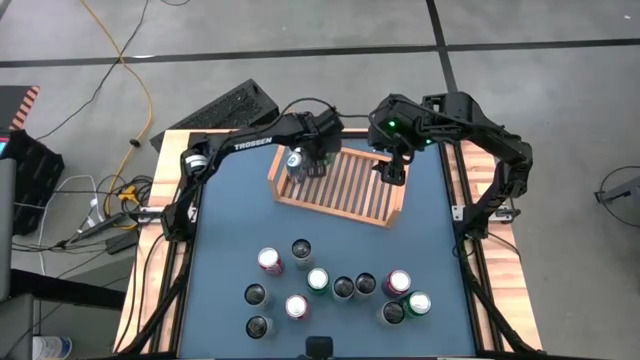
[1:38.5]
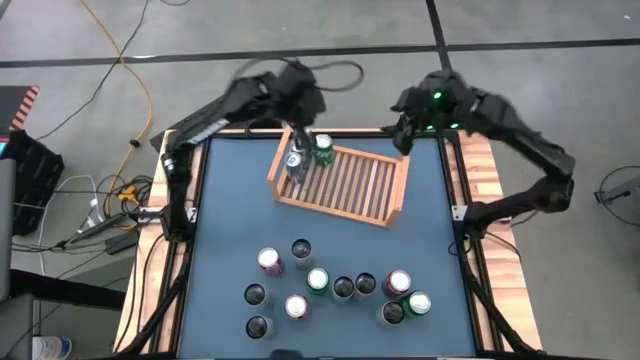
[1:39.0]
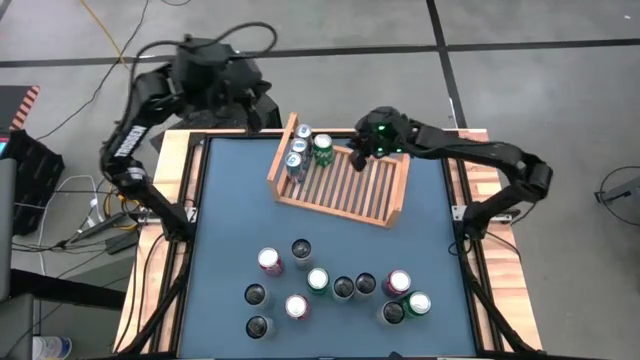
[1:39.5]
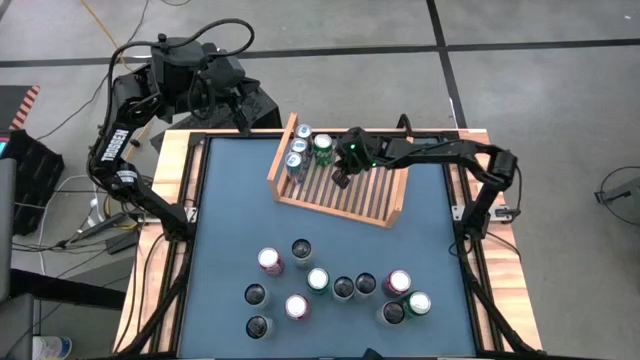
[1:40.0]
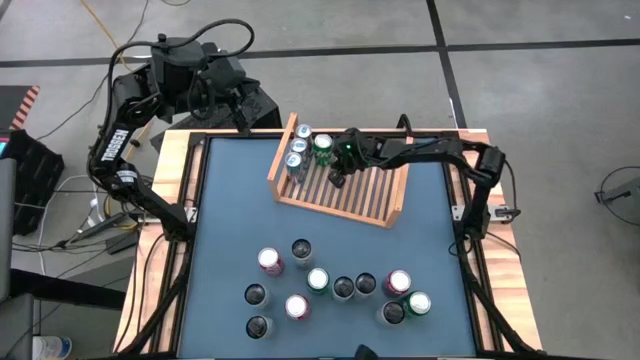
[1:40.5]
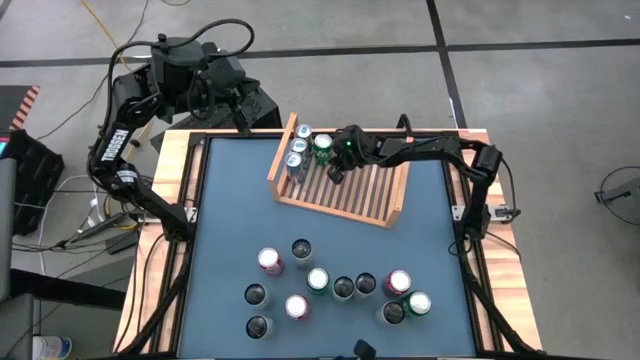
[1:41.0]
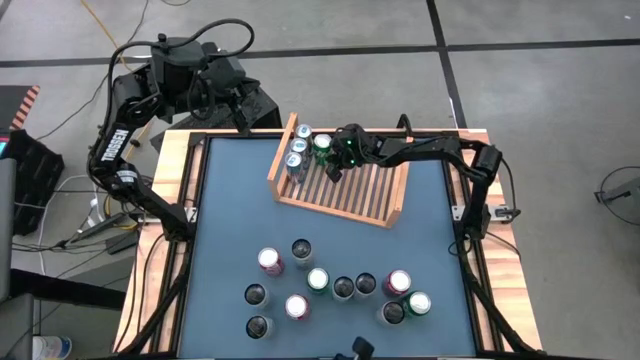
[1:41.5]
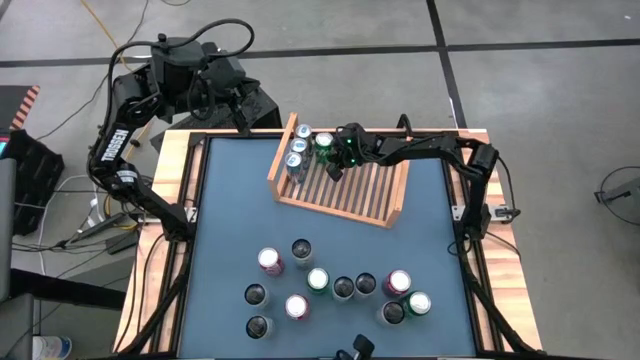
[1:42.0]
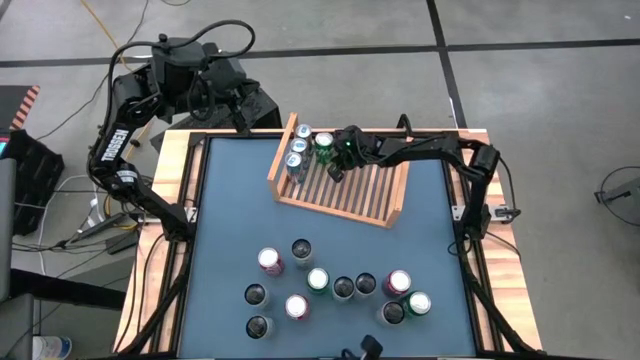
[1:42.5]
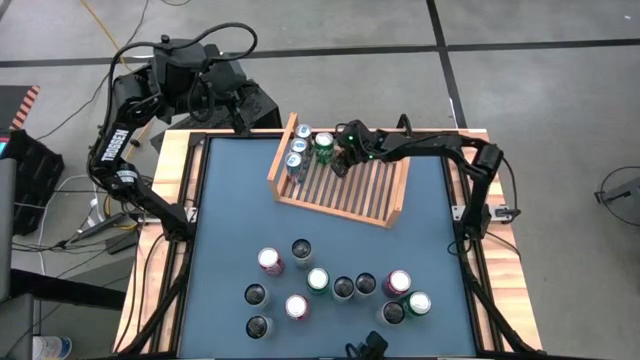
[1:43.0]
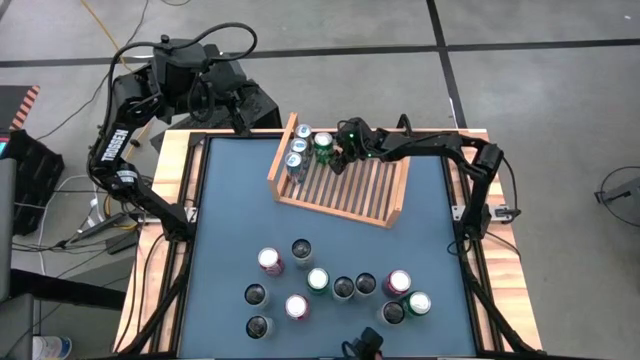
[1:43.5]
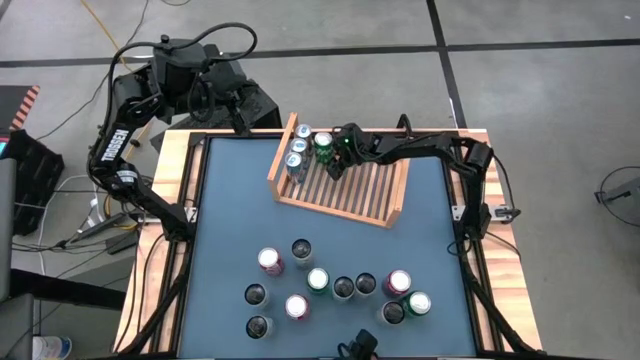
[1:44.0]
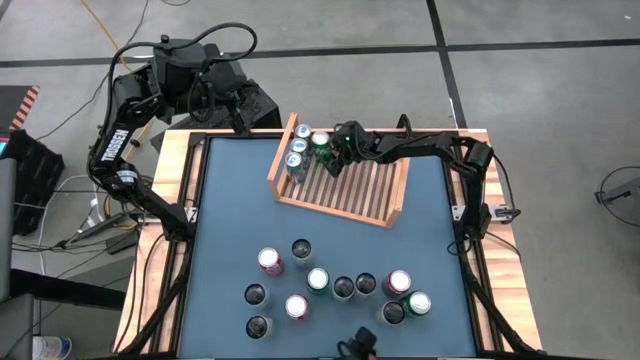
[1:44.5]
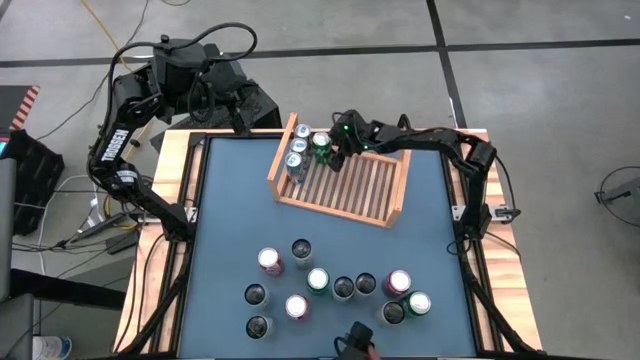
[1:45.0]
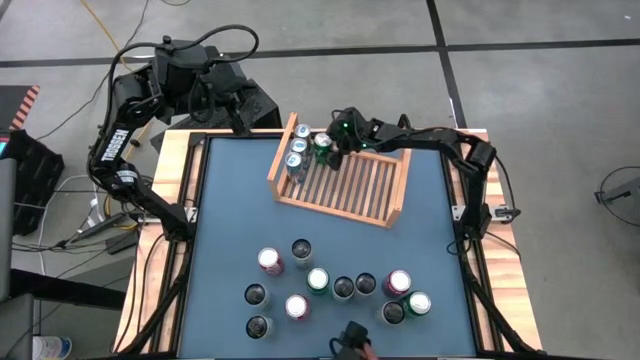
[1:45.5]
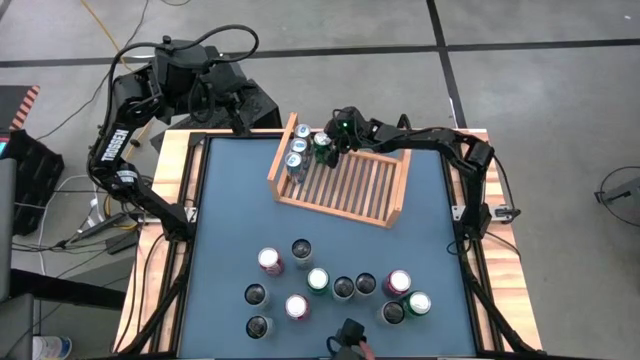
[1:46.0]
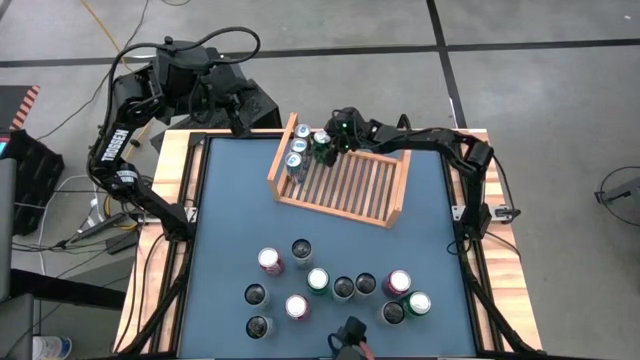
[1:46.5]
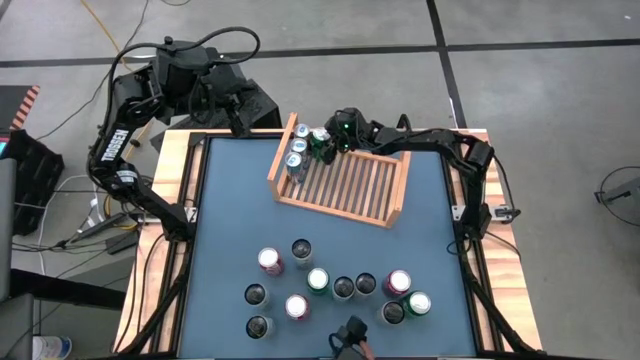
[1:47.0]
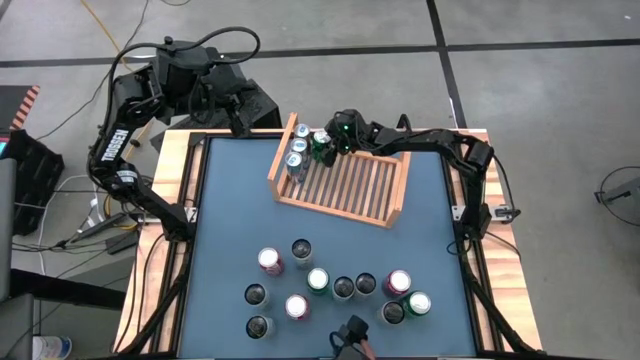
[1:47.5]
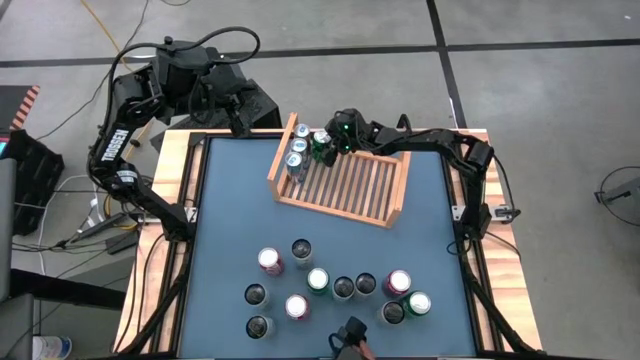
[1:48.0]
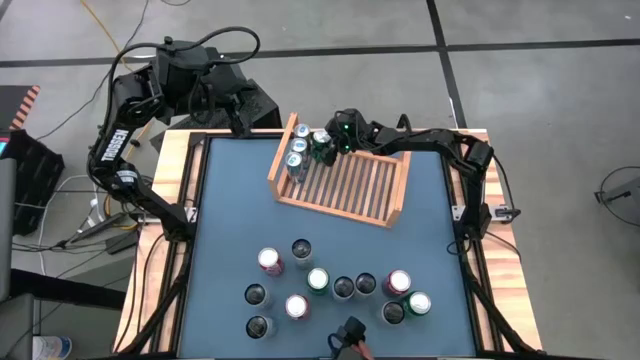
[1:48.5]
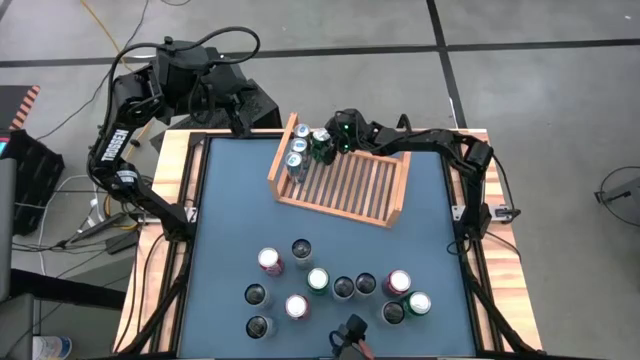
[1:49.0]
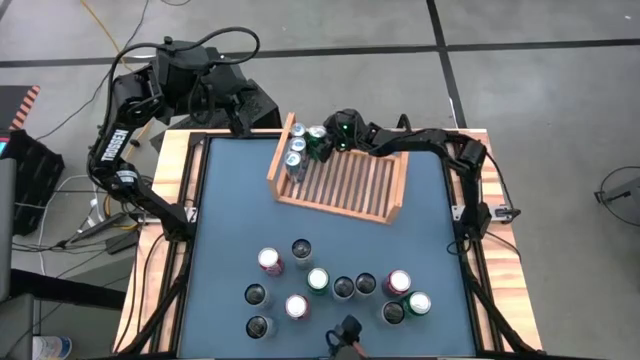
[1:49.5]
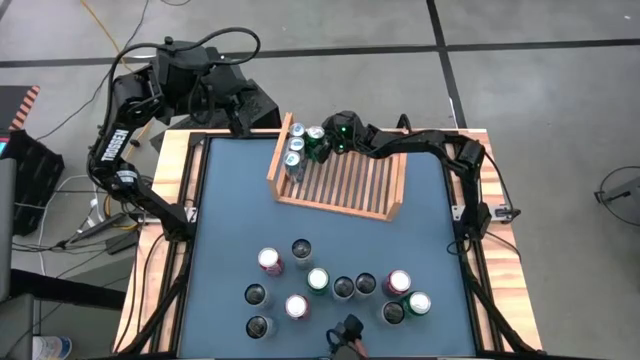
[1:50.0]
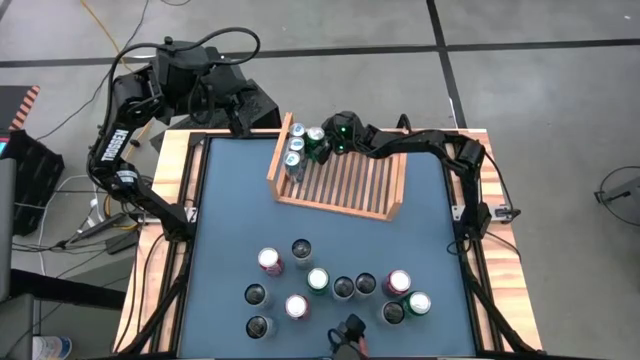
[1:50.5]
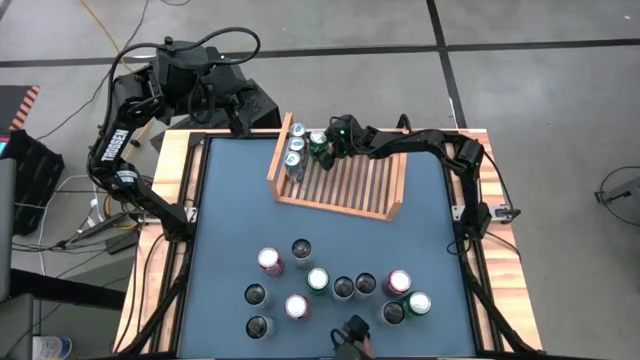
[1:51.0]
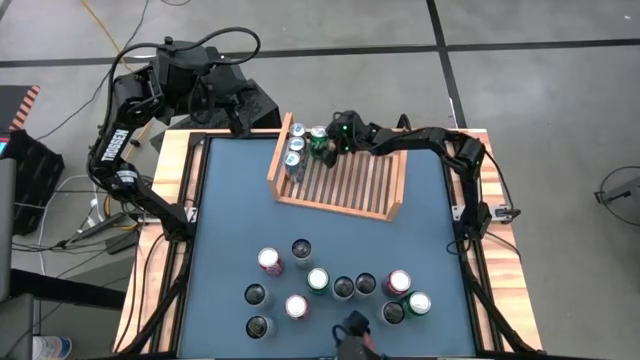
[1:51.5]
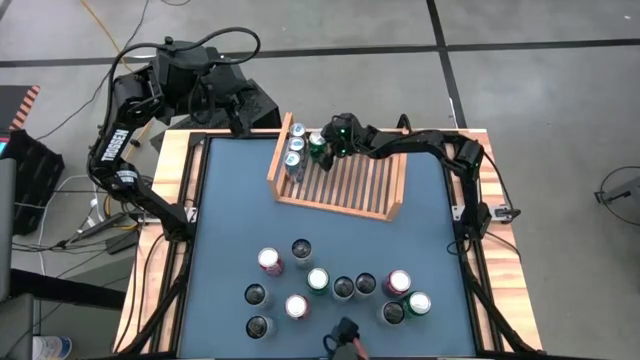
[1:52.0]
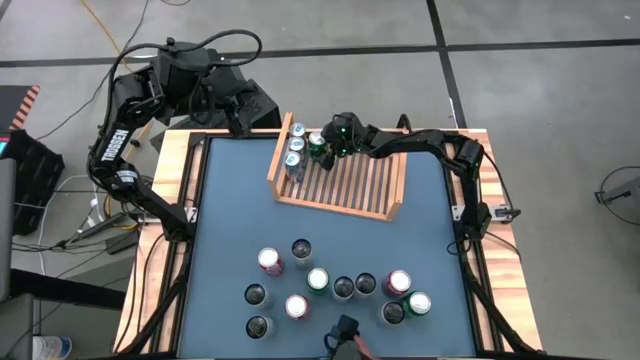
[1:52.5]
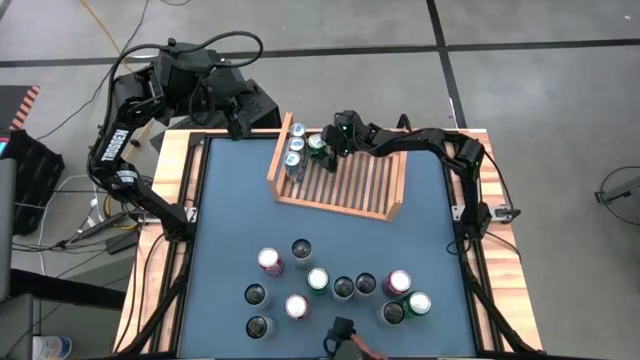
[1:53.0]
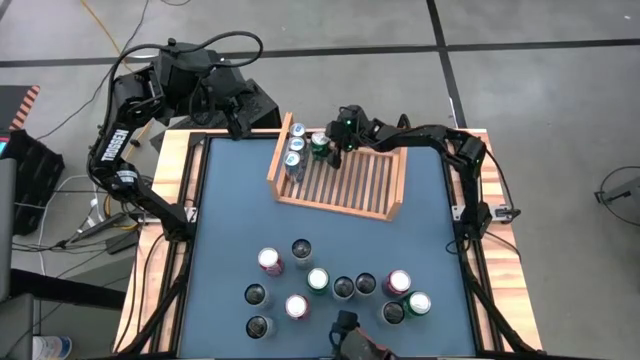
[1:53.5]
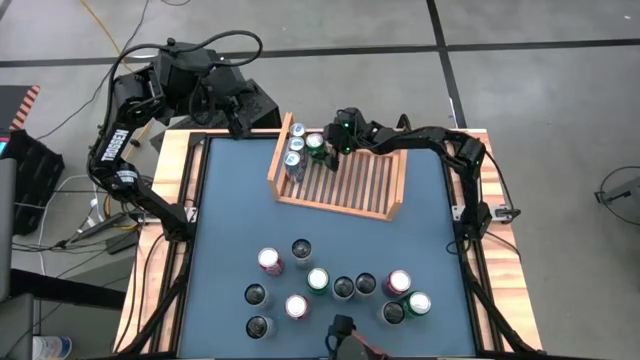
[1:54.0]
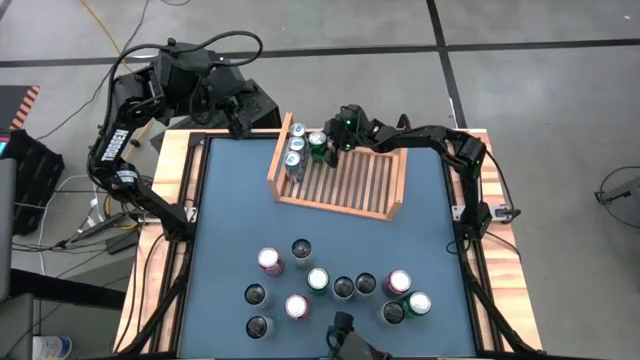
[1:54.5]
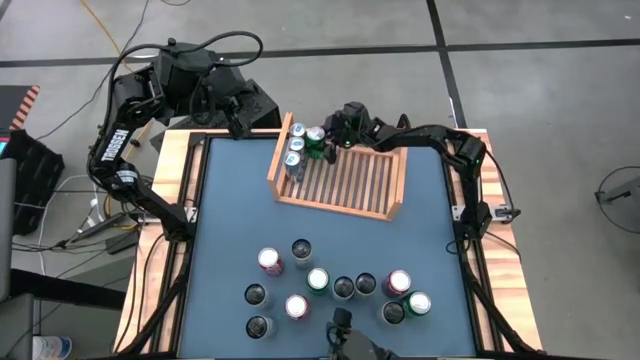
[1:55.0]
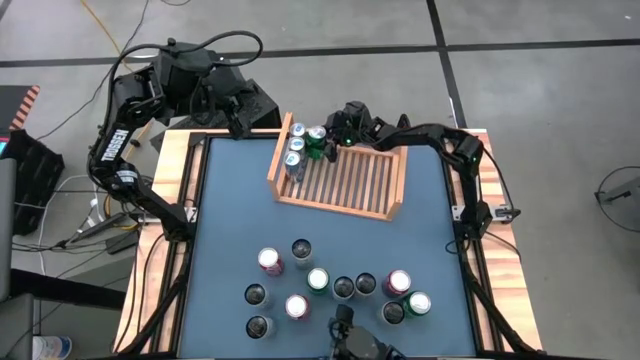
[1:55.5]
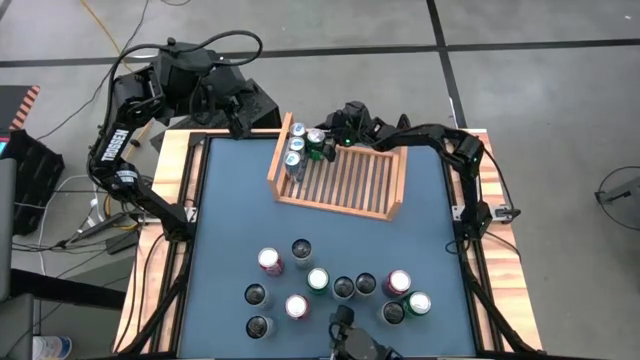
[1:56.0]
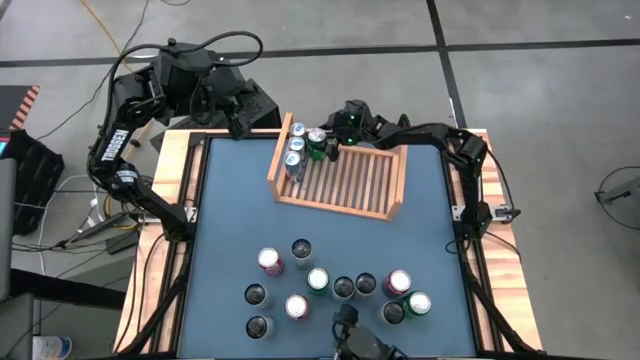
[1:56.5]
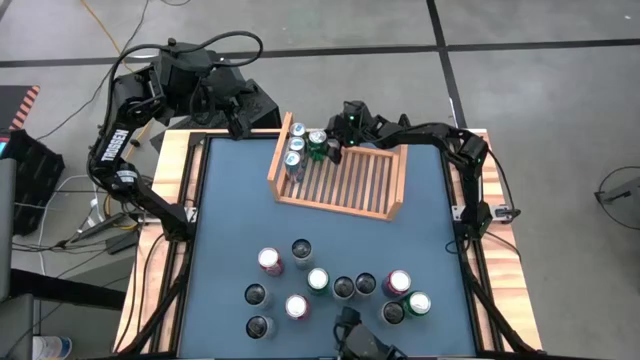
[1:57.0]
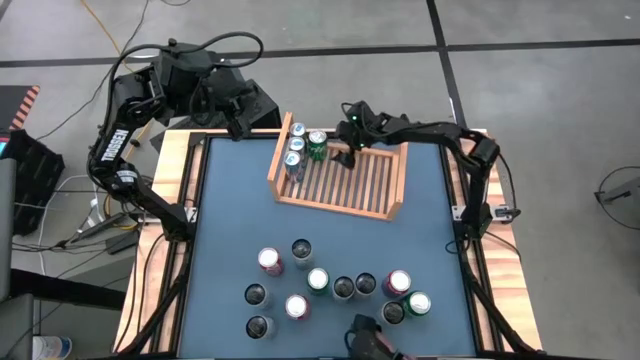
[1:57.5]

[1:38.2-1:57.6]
Task: Place canned beverage on shelf
Put the green soda can on the shelf

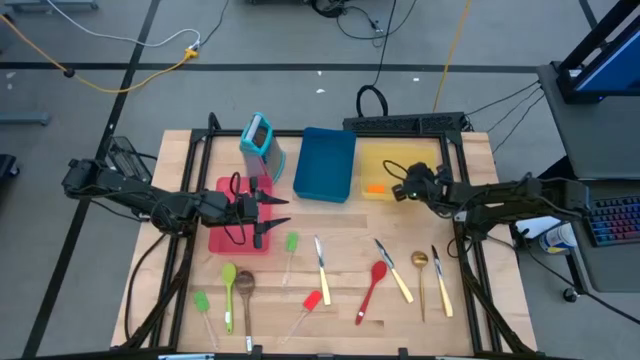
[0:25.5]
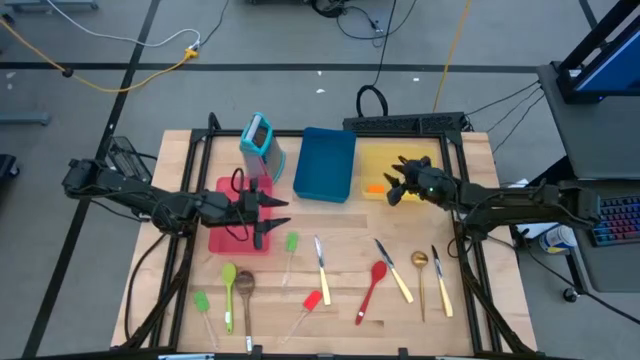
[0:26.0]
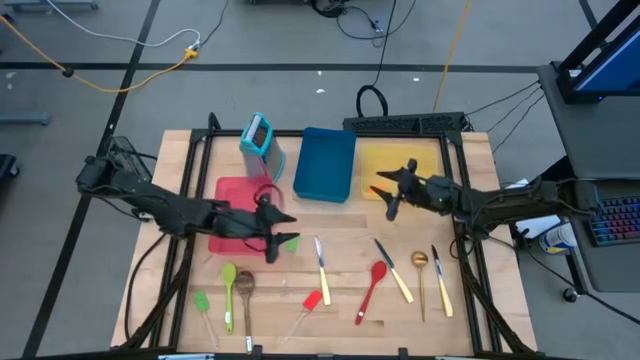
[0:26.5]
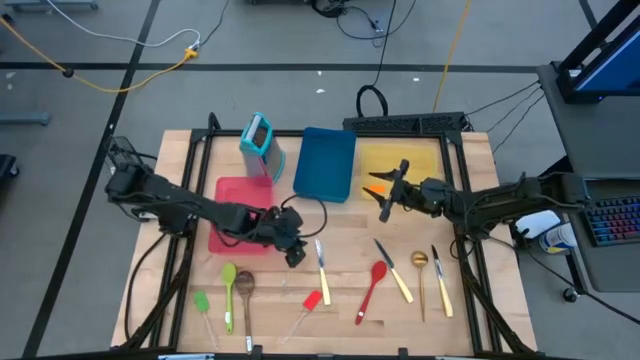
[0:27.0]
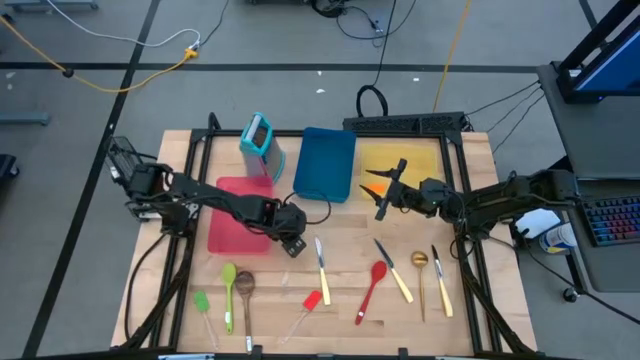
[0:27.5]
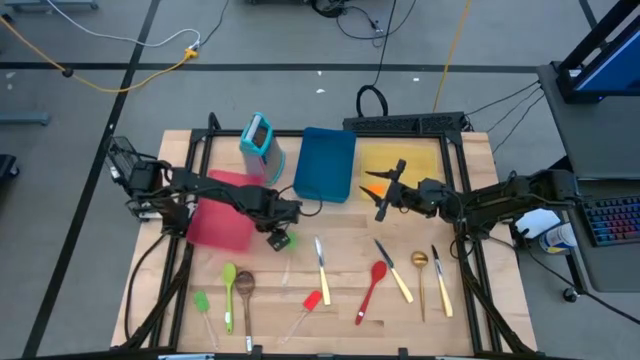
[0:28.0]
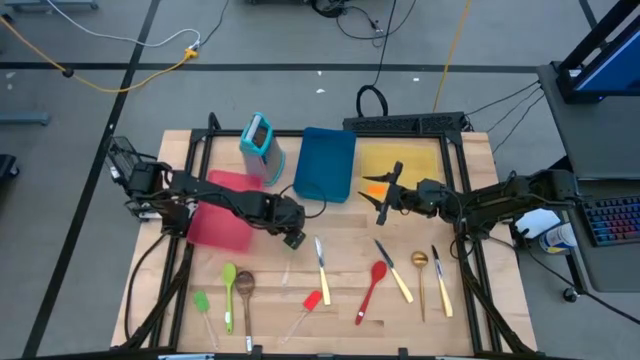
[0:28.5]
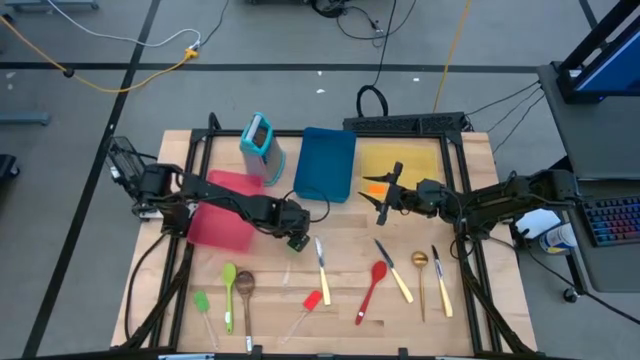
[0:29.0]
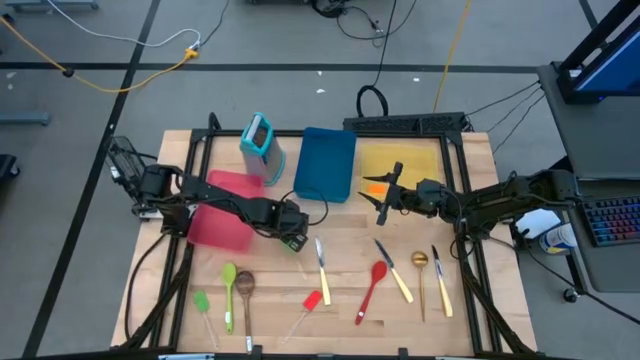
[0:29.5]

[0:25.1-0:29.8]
Task: Pick & Place Kitchen Items
Put the top green spatula into the yellow bin
